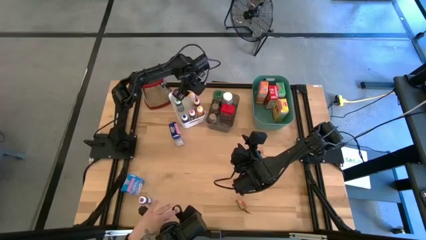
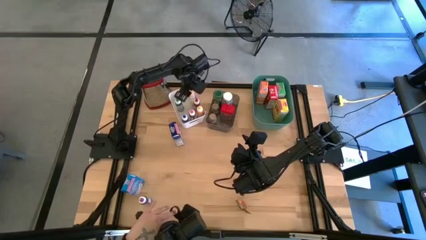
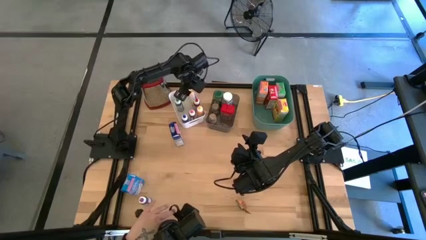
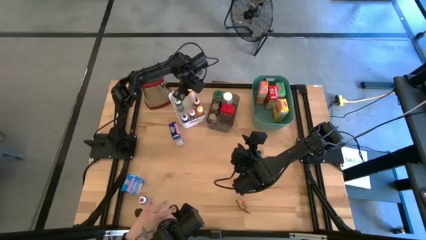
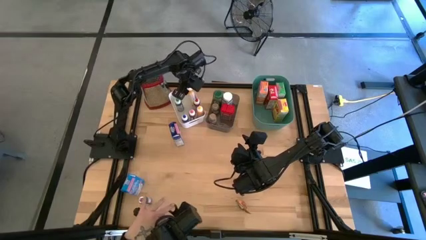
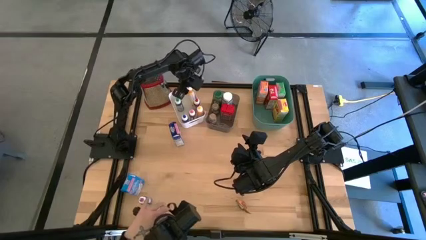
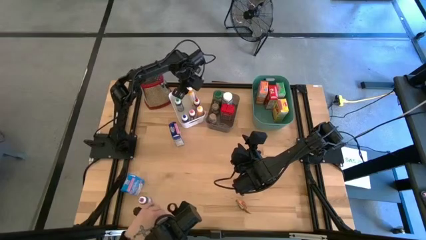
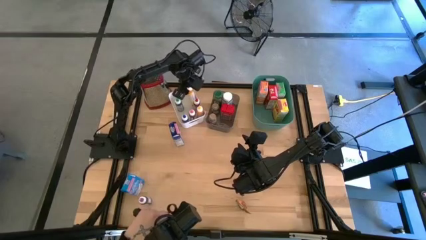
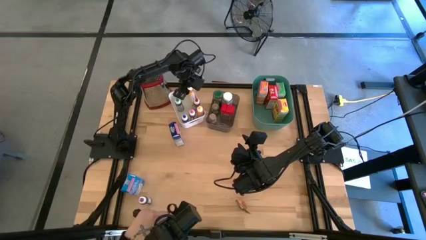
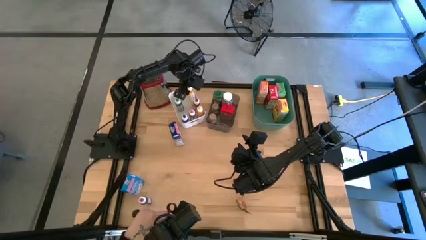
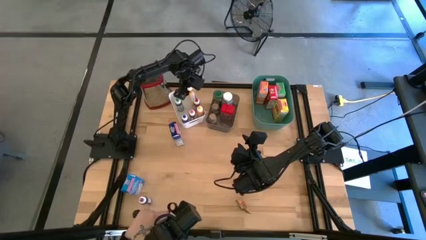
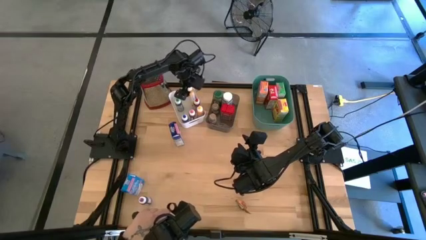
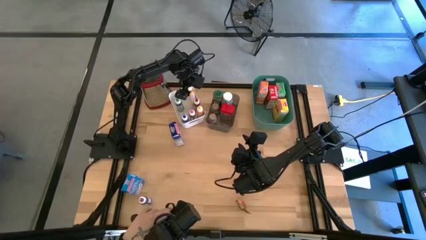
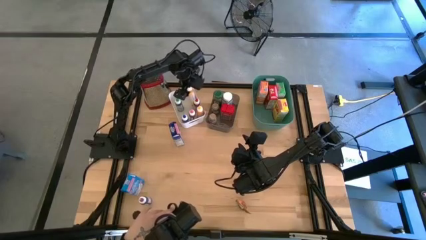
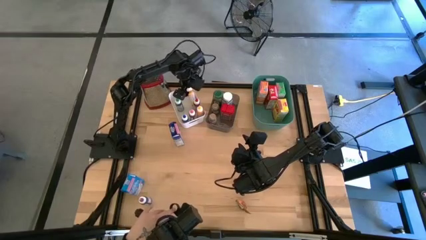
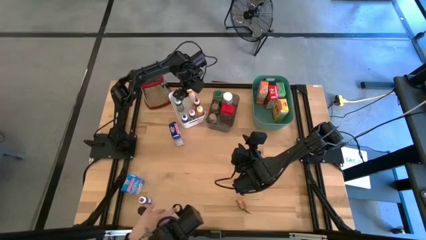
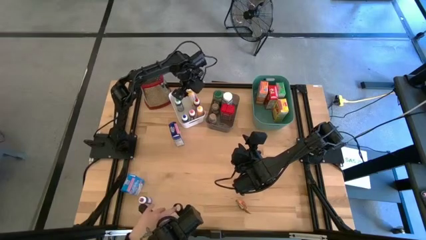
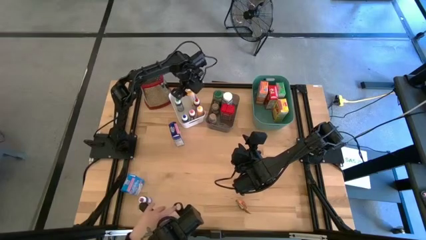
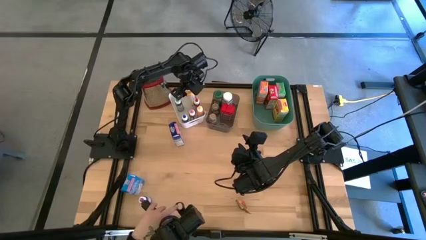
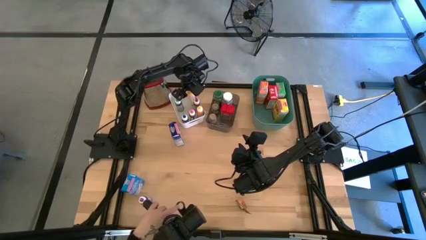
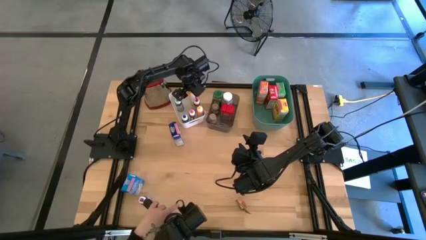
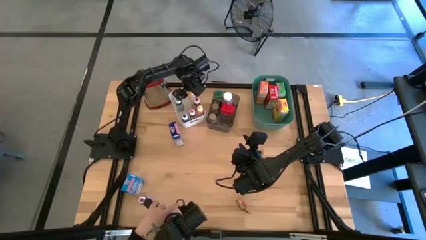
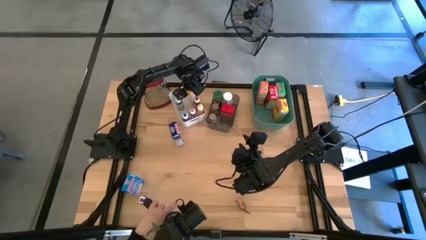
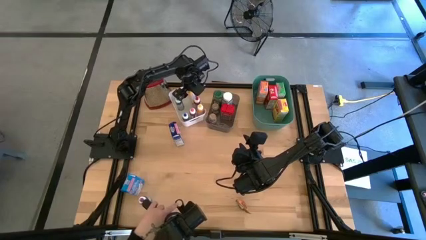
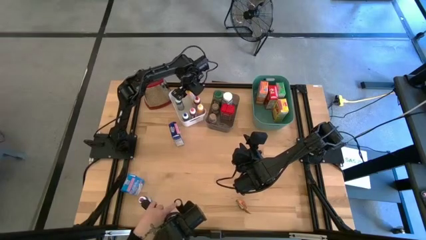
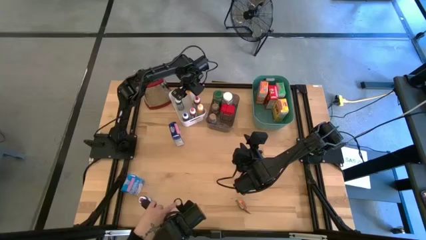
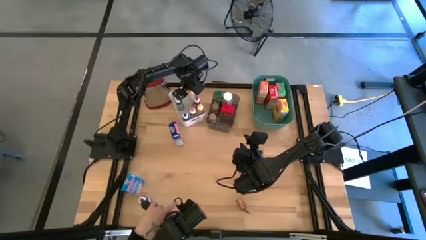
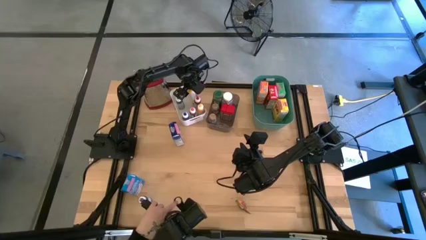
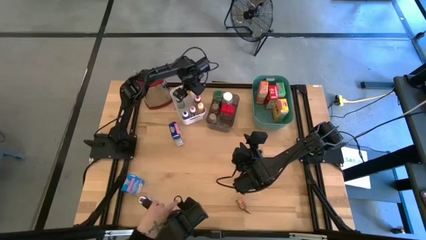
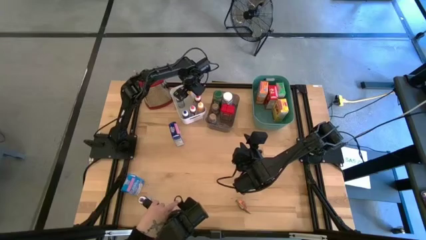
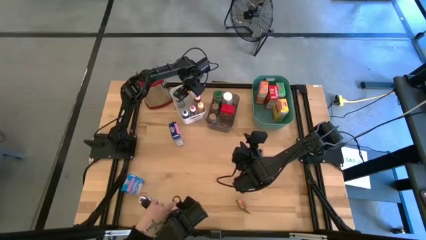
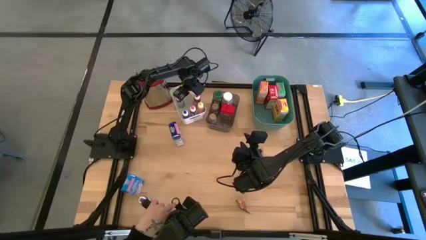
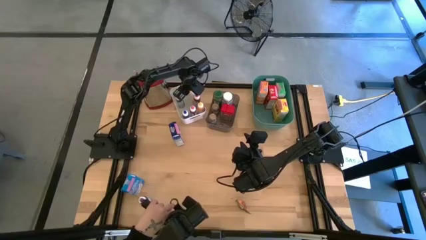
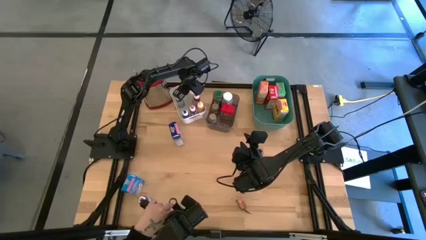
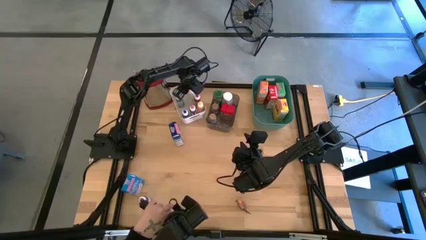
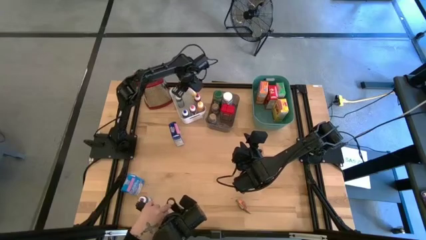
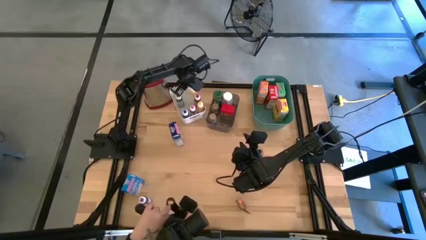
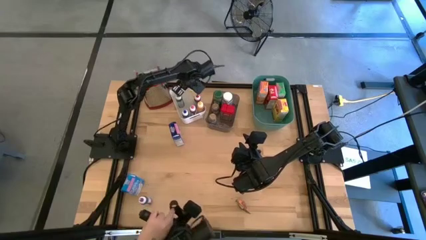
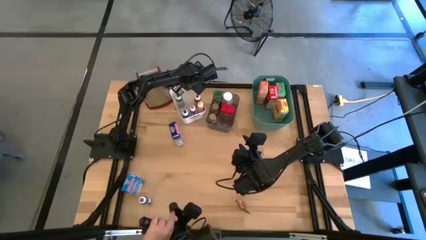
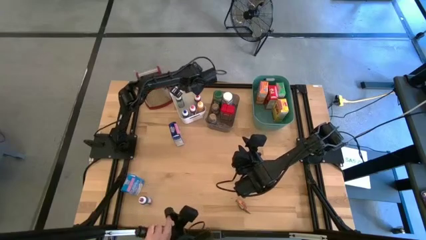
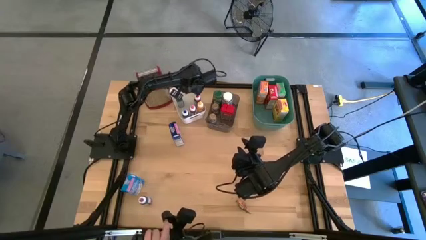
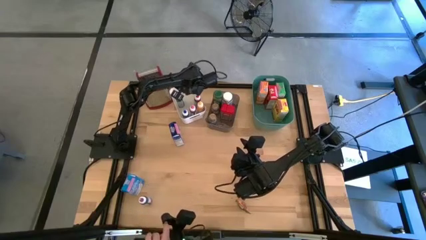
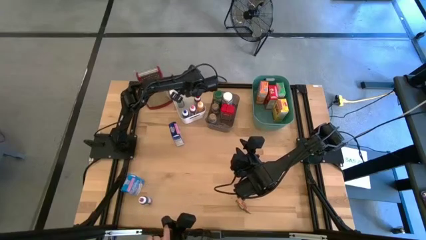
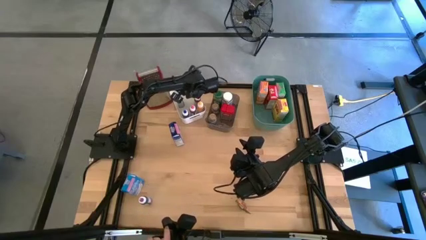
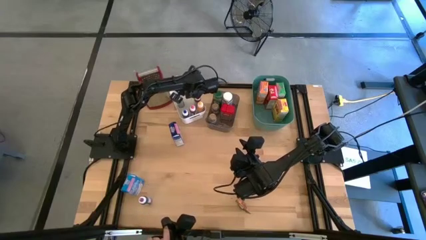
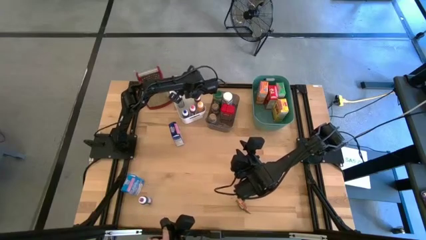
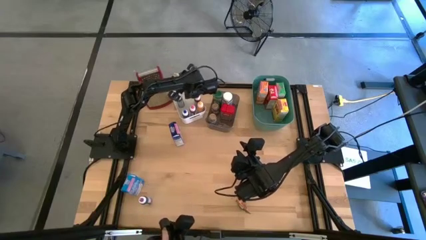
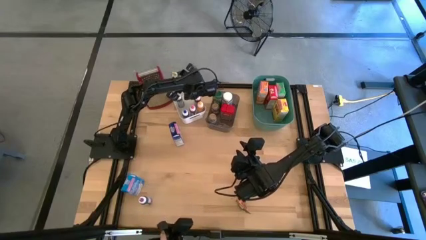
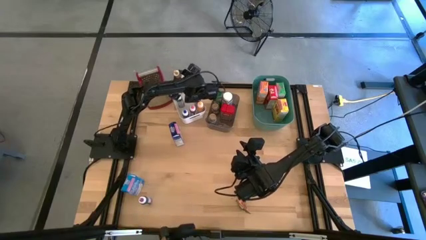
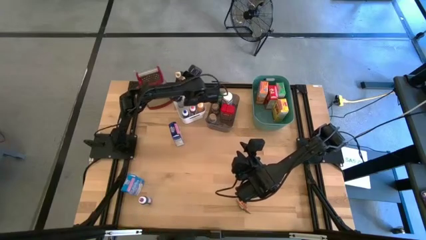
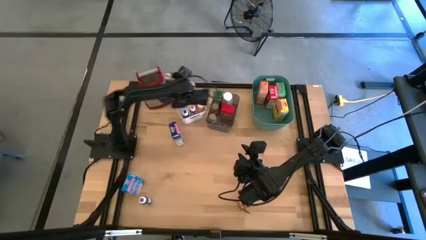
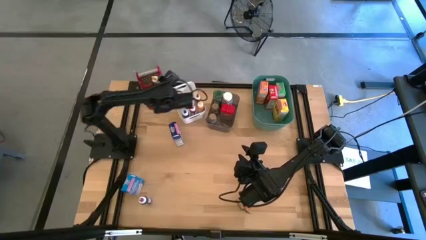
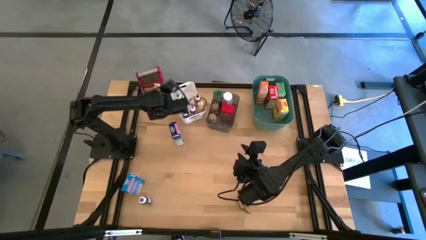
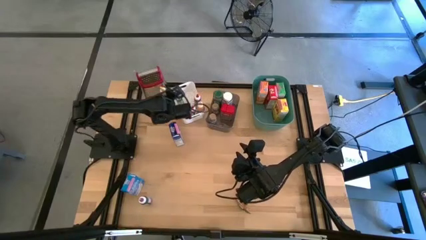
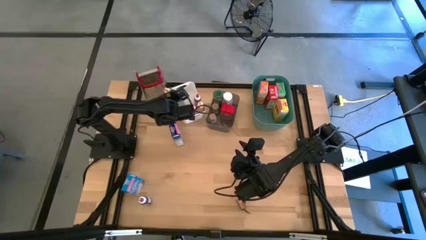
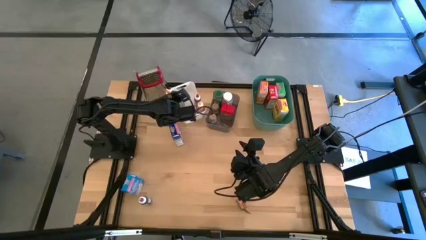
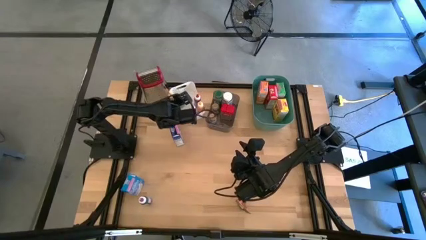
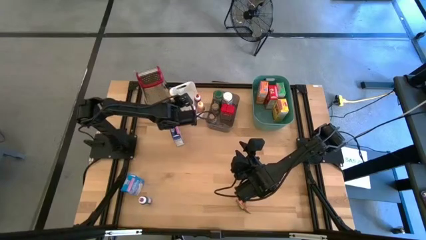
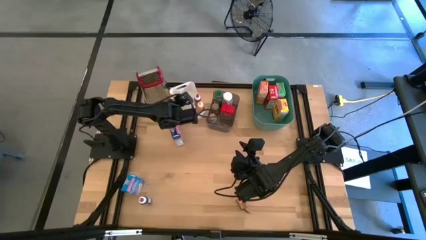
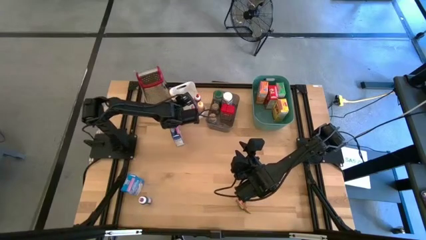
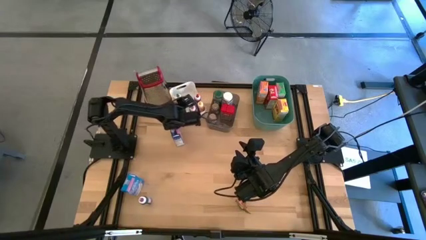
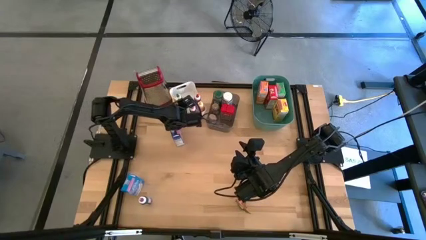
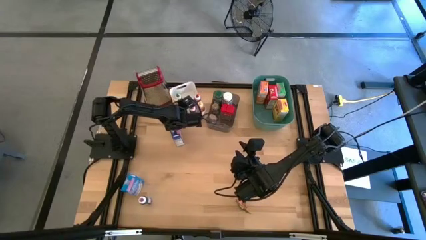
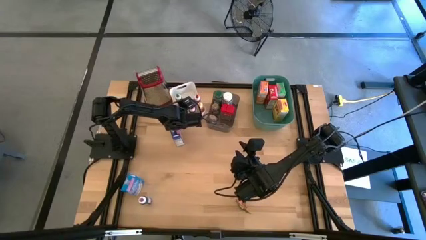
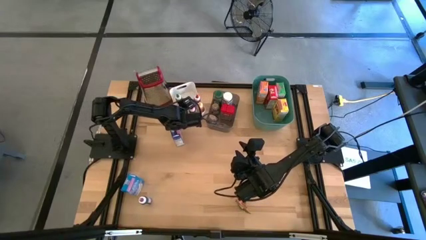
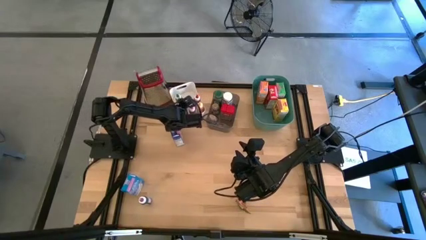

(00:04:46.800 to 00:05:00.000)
Task: Pick & Place Kitchen Items
Adjust the yellow food coloring in the white bin

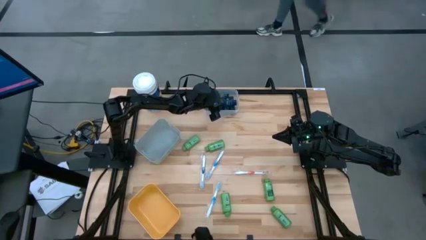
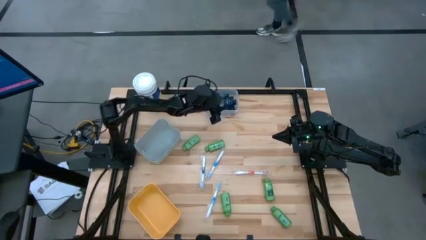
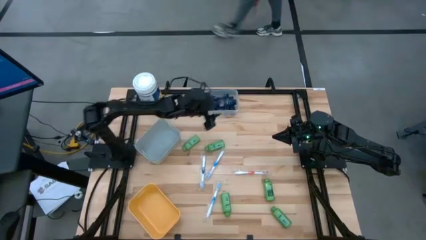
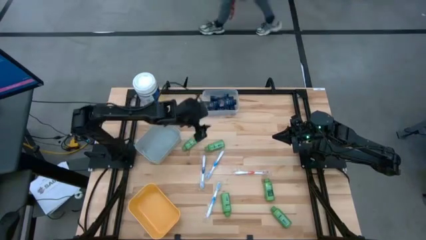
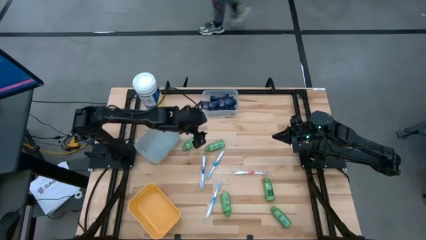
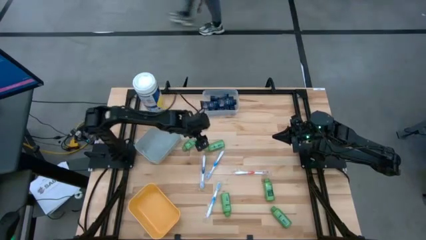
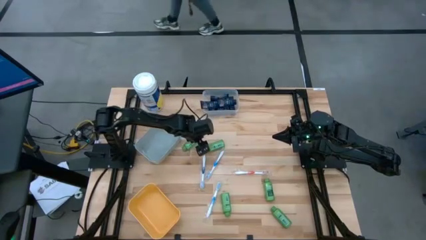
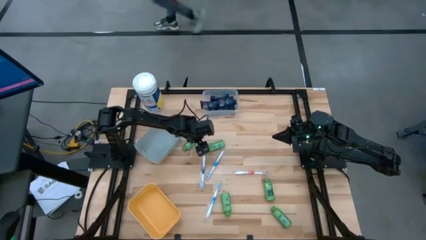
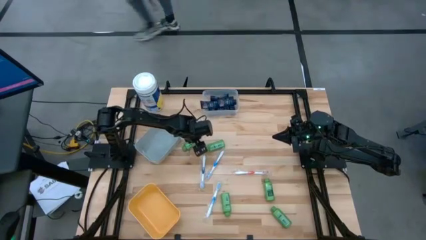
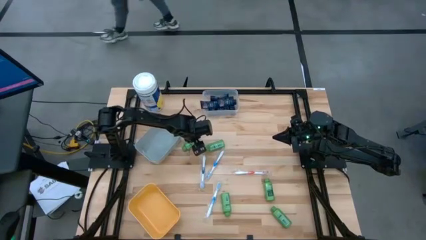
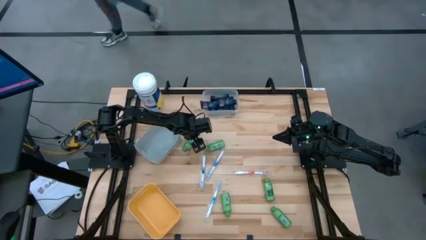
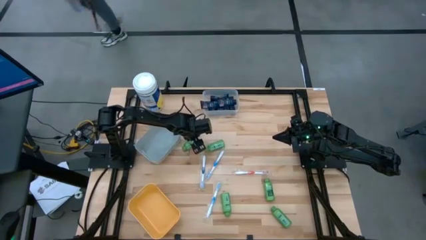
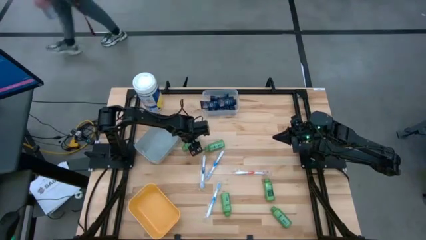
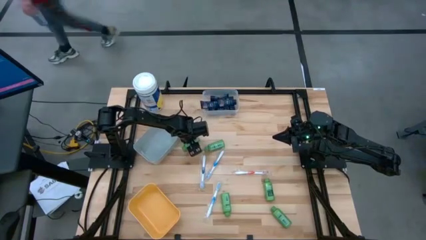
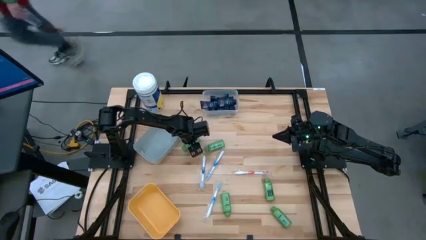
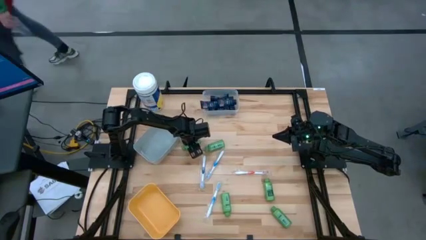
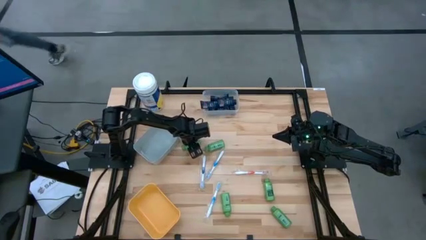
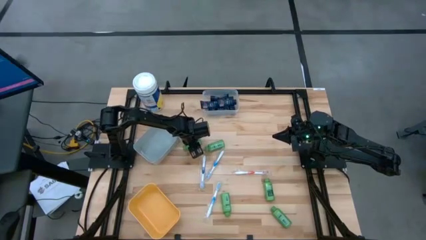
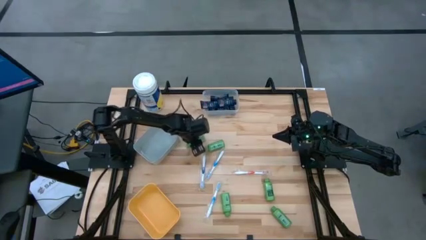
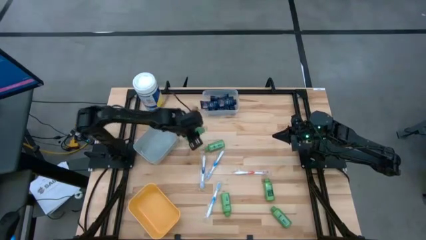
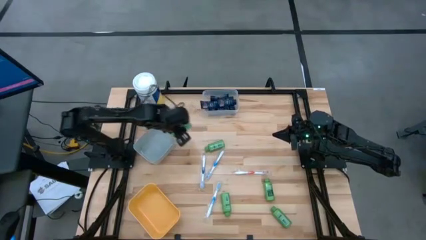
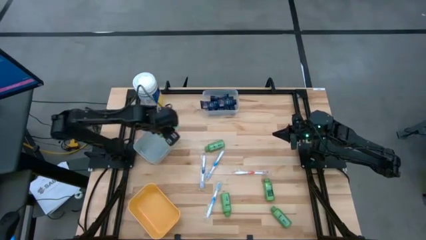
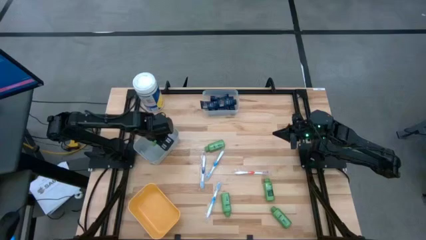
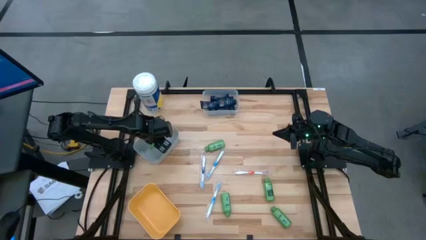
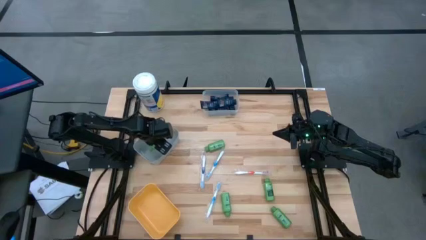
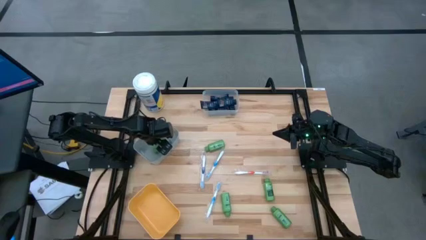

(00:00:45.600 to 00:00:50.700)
Task: Pick & Place Travel size toiletries
Put the green shampoo into the gray bin
